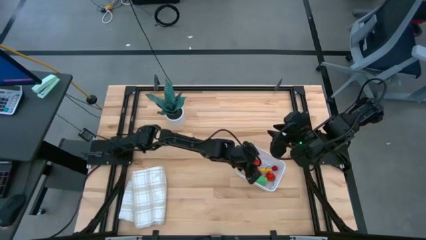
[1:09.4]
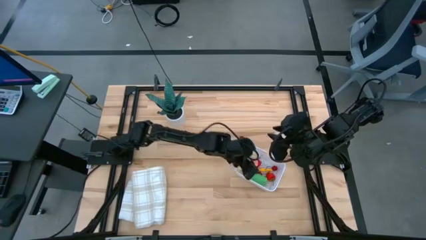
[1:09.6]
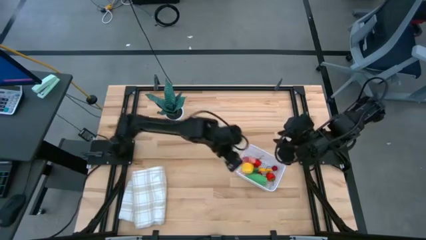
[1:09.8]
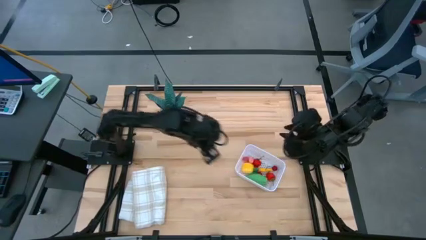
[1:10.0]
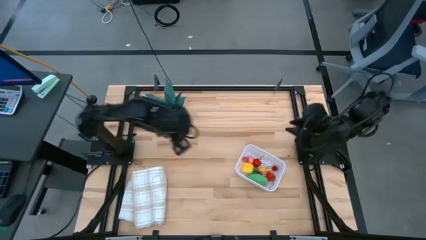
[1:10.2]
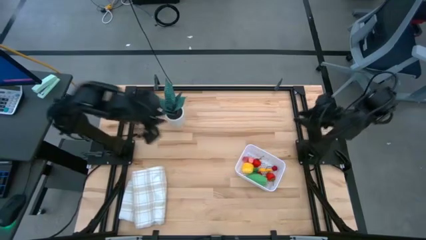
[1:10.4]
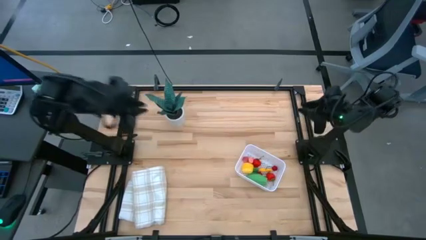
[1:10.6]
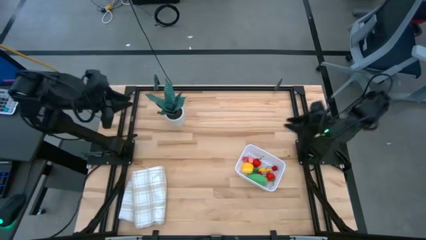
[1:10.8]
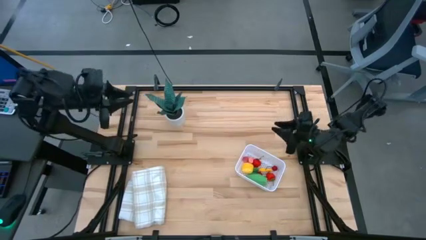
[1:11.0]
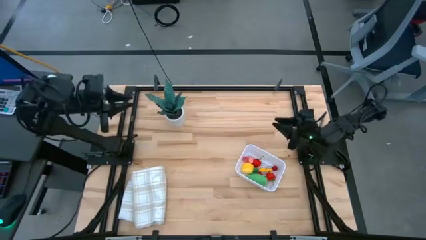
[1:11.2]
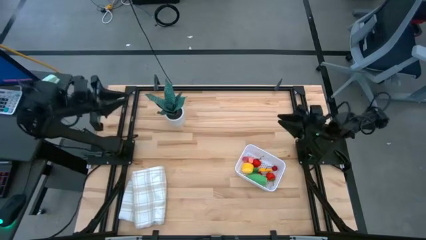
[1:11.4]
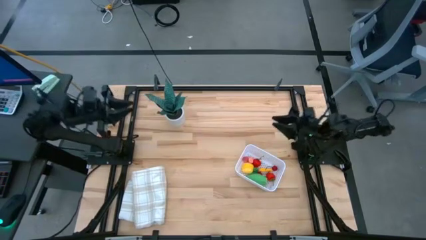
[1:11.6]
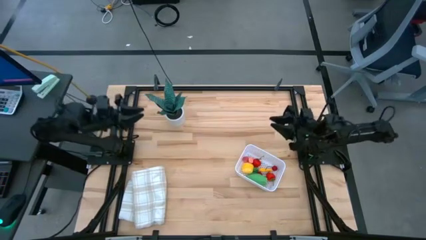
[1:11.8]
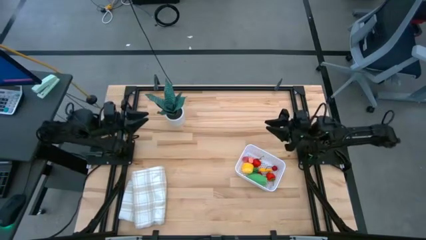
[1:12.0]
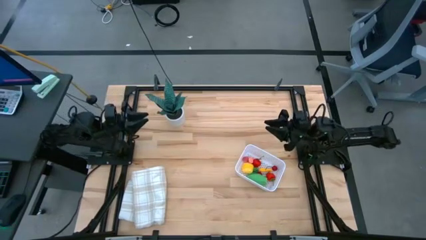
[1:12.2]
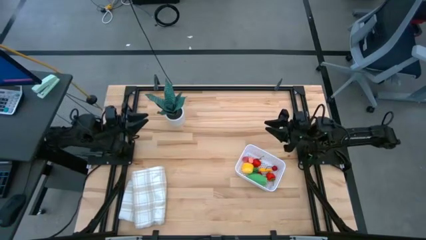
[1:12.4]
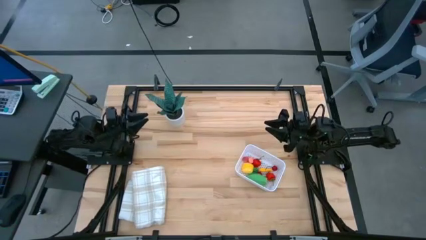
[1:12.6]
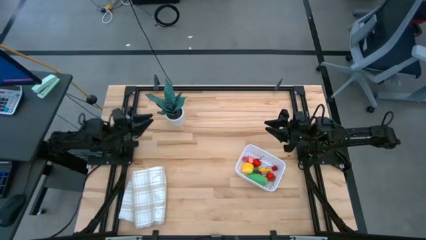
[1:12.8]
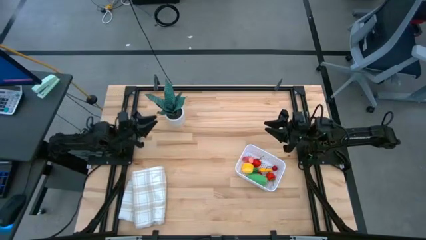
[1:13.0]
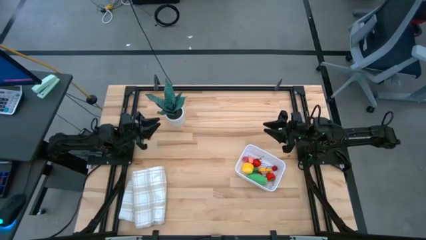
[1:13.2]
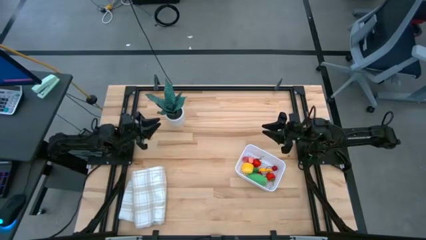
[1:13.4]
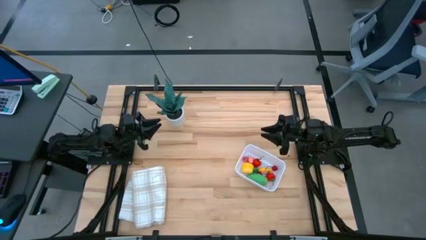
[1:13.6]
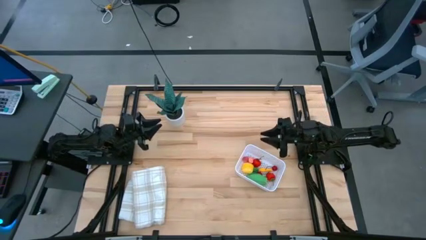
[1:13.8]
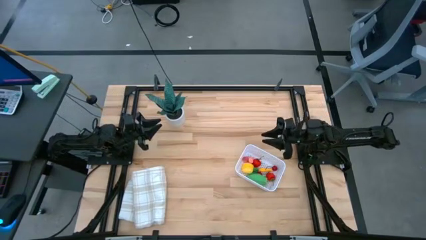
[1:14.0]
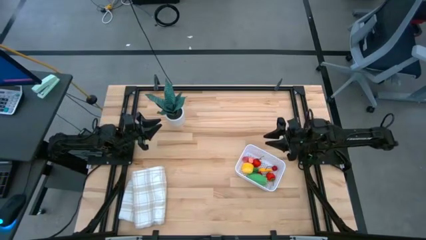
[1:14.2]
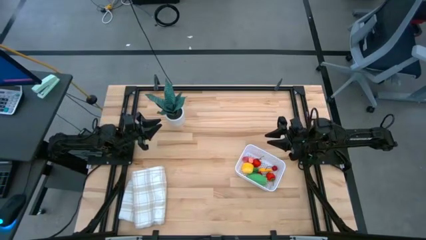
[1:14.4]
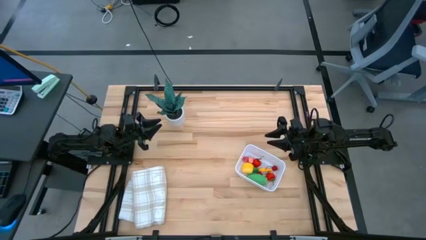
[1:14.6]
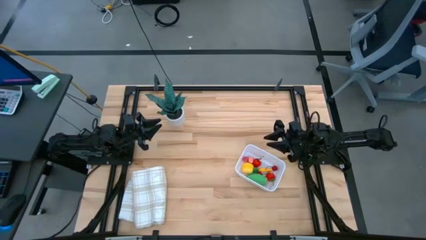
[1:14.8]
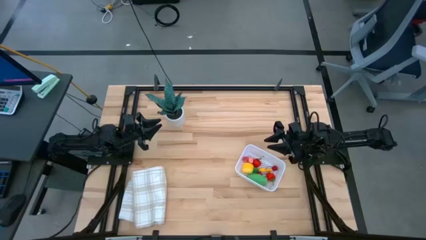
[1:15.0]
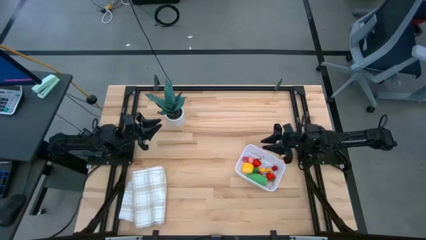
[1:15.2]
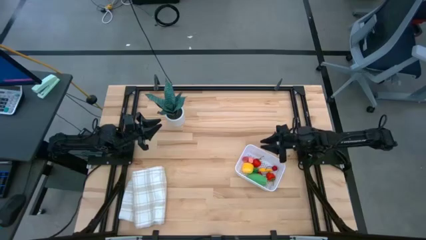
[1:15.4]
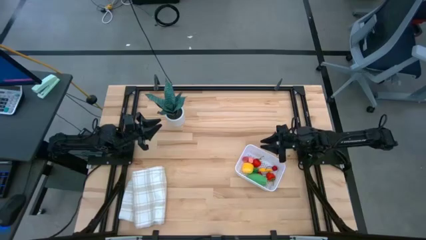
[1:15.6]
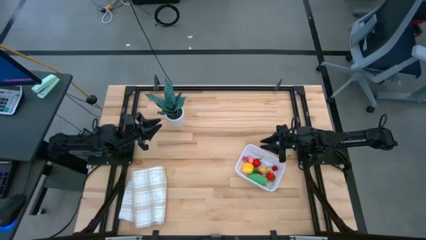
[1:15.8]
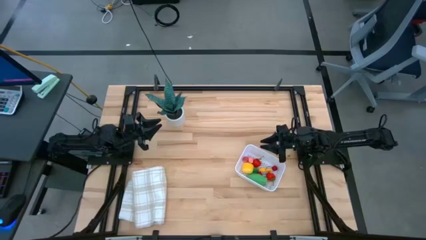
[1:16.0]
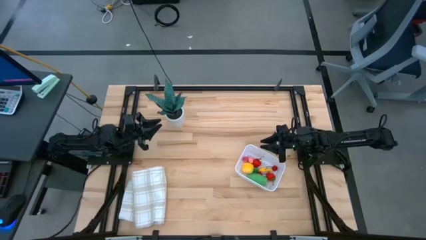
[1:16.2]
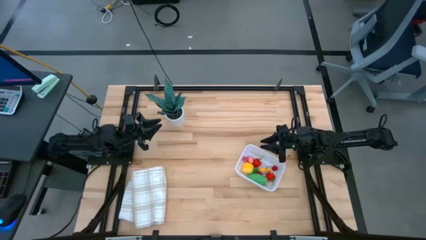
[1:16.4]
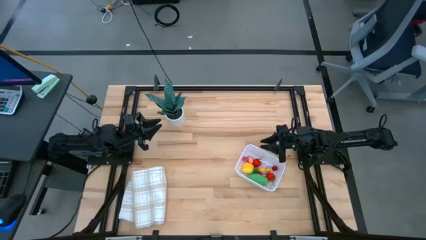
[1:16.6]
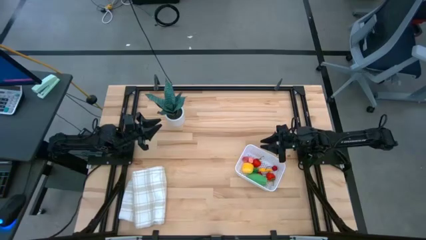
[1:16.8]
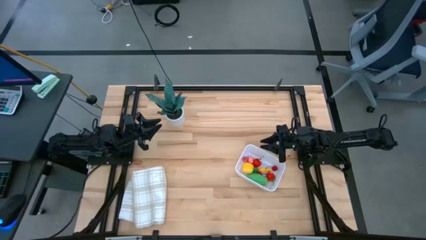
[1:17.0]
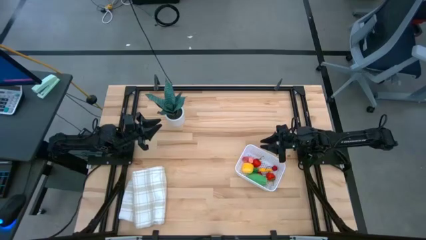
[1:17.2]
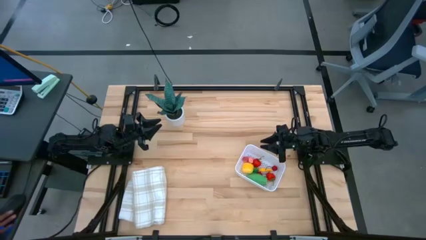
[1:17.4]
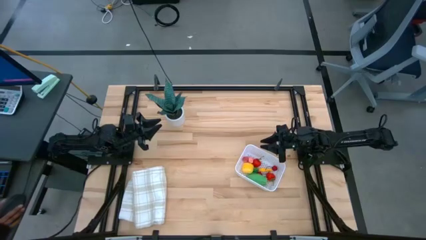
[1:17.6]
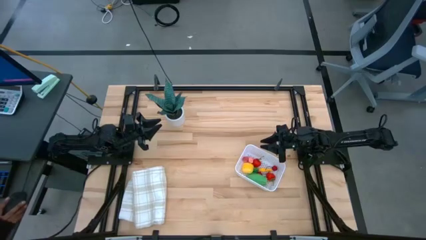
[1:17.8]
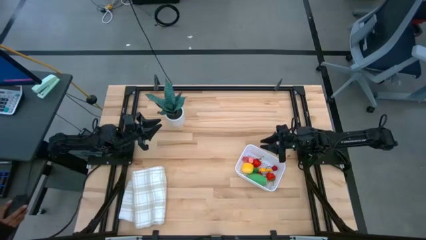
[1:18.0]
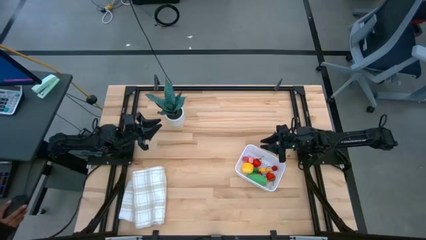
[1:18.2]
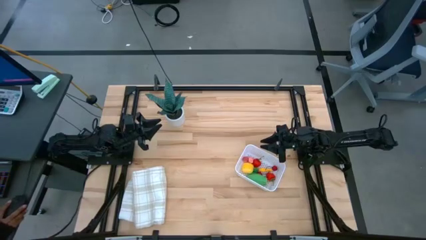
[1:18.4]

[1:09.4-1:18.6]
Task: Pick and placing Produce into tupperware
Return to Home Position

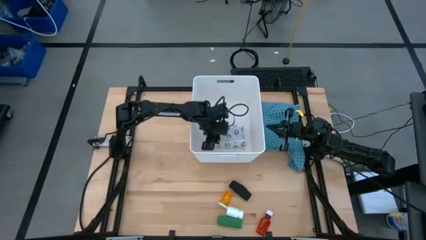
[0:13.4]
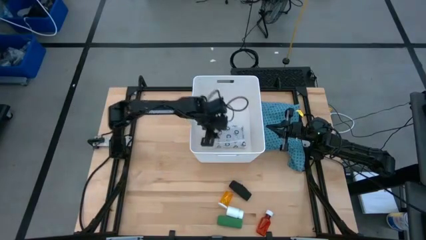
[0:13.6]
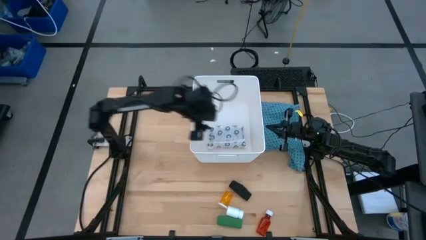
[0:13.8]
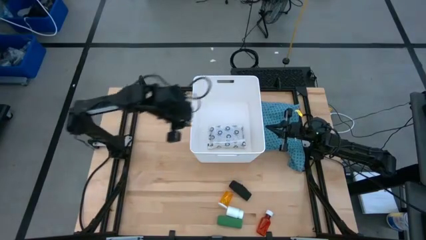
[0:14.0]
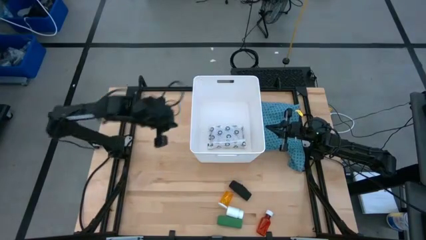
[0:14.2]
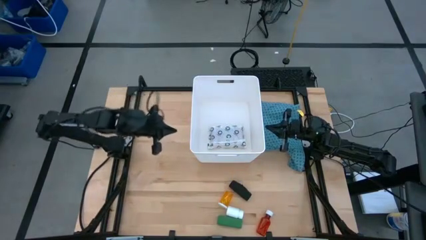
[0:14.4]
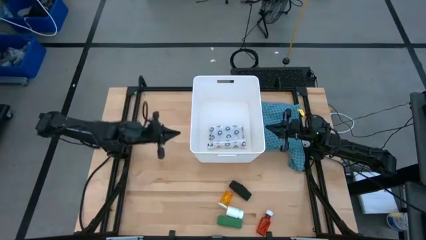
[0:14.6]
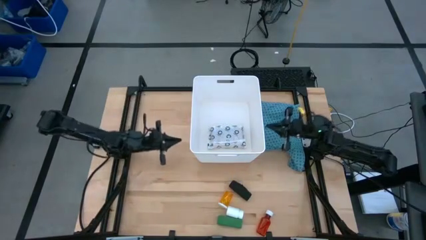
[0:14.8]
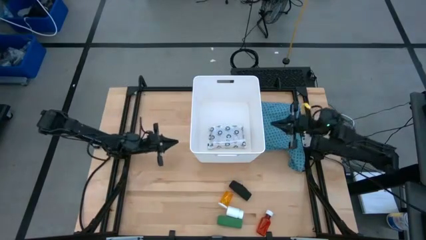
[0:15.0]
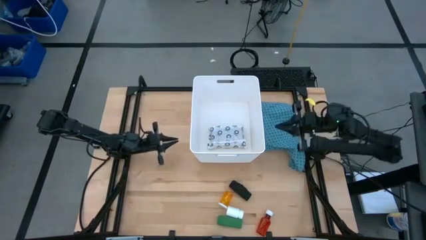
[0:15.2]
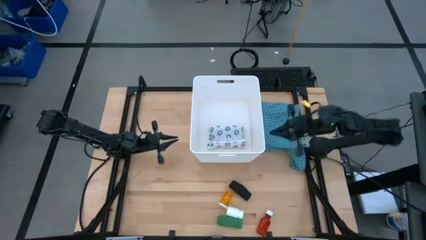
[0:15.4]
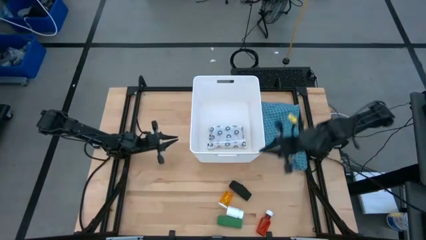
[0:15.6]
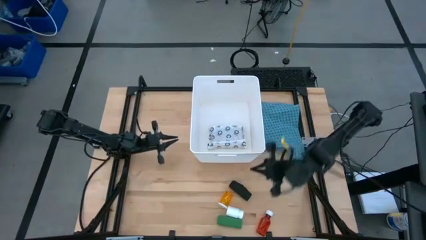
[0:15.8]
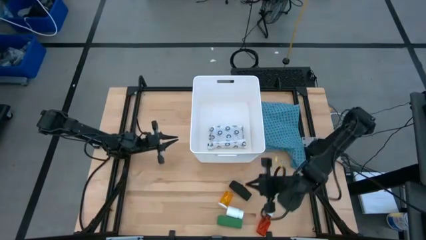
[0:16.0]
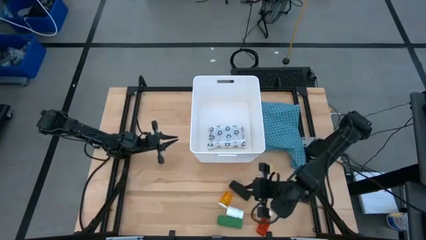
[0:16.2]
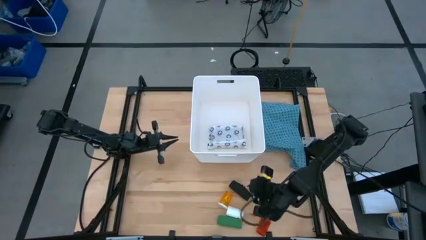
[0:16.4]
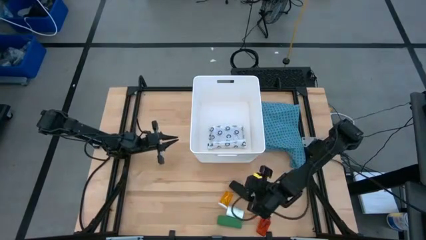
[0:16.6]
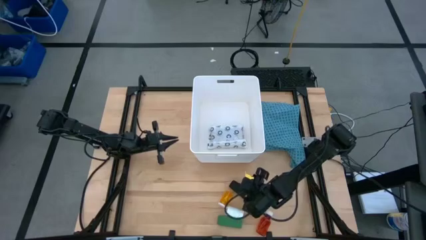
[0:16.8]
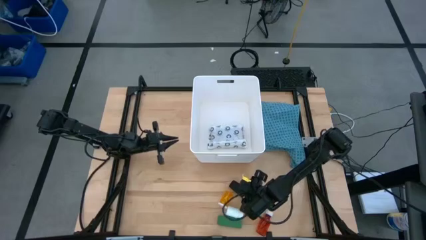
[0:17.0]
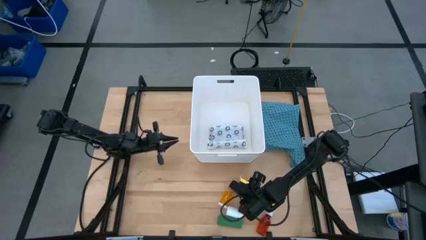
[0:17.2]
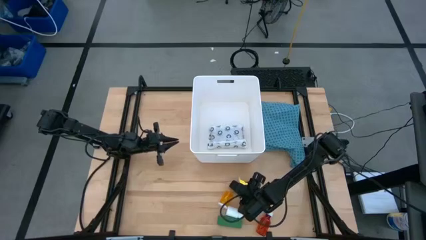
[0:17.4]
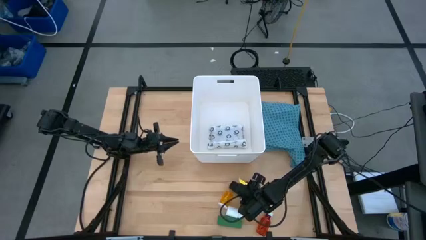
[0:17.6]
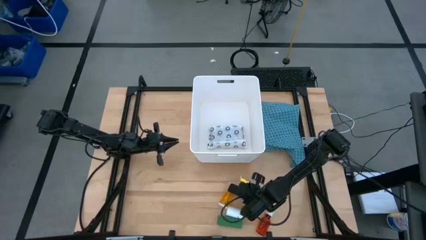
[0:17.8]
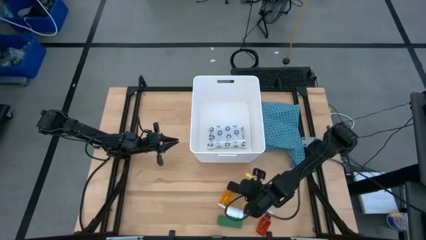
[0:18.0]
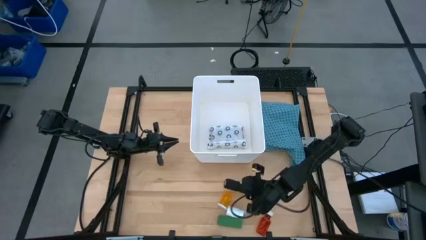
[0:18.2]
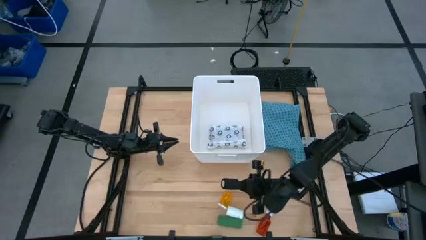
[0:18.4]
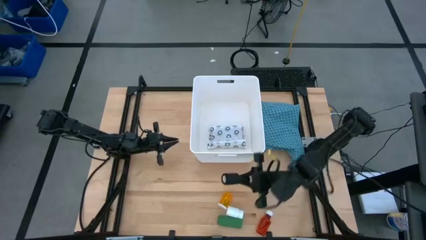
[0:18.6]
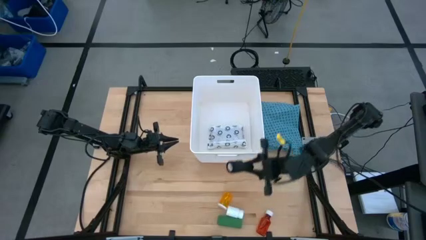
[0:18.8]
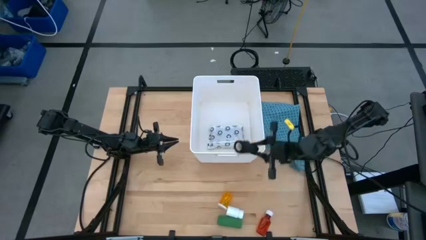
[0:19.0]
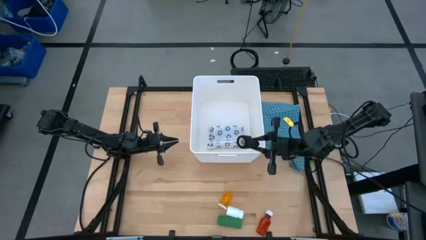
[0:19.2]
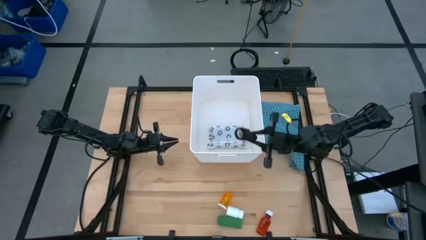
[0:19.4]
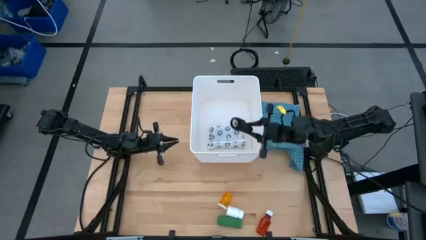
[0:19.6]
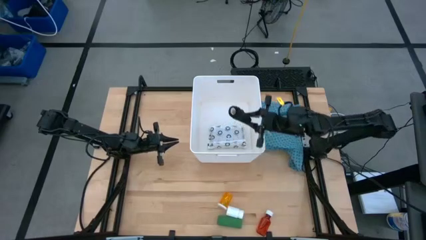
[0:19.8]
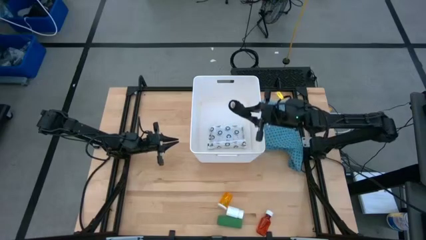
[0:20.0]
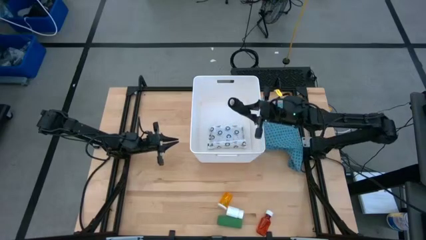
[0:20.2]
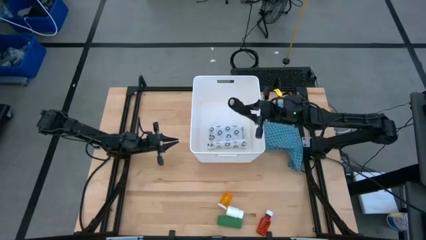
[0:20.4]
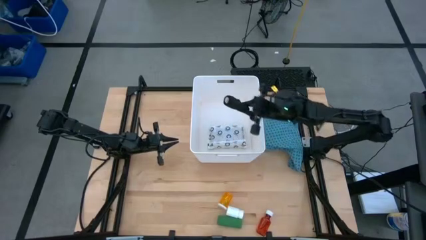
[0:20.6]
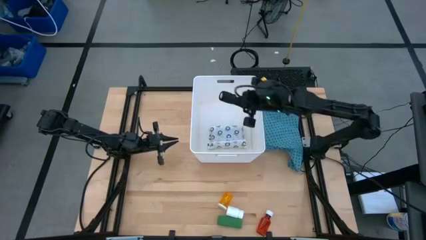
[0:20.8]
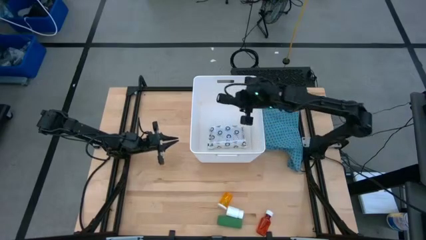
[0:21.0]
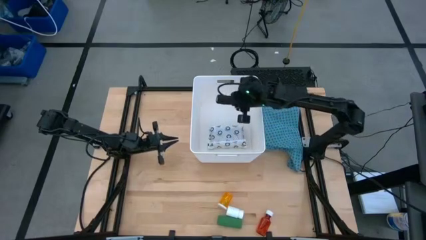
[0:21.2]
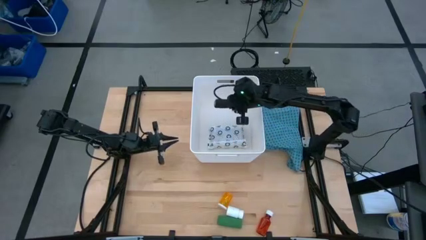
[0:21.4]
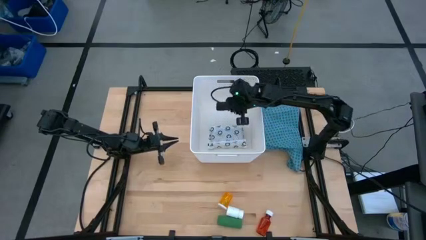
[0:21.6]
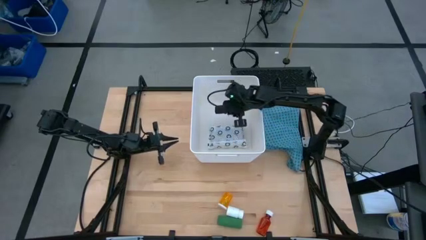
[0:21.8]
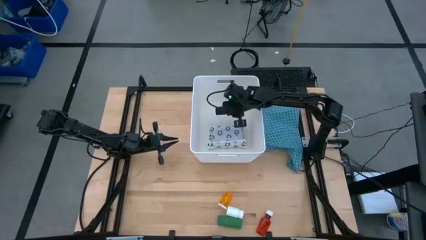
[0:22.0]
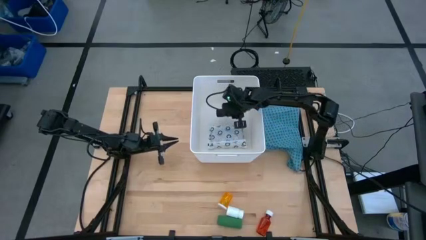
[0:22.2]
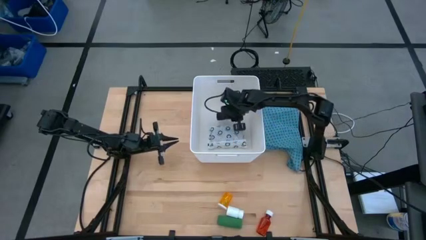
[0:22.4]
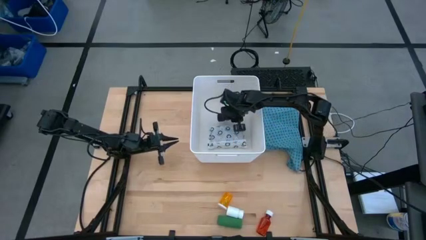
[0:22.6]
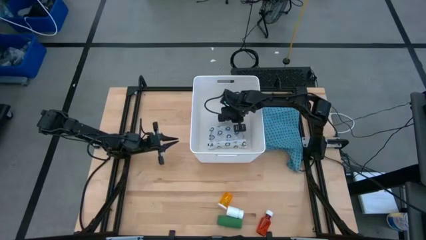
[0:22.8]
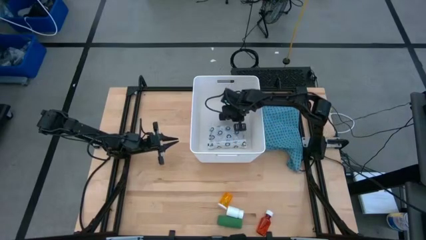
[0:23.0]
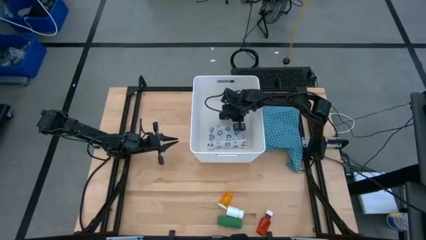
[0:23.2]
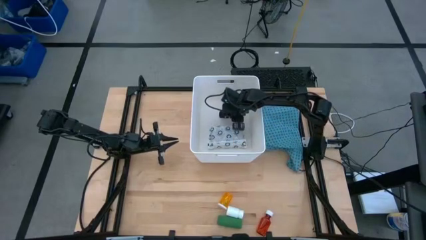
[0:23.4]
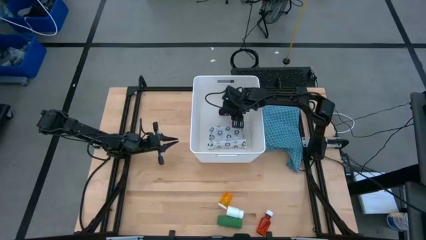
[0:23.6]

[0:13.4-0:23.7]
Task: Pick & place medical supplies in basket/bin
Put the black bandage into the white bin
